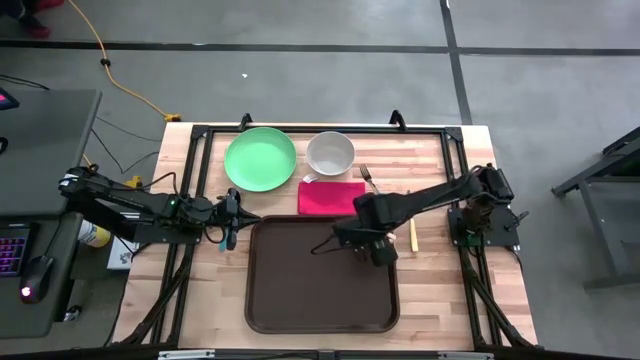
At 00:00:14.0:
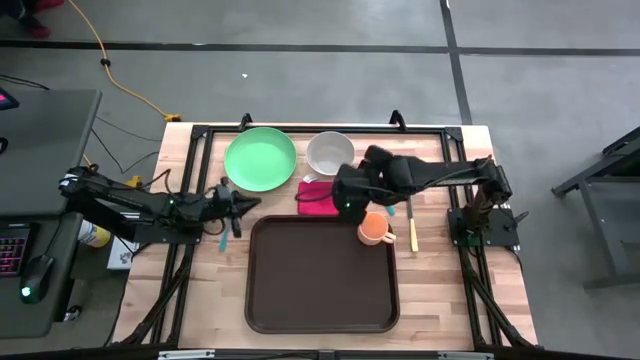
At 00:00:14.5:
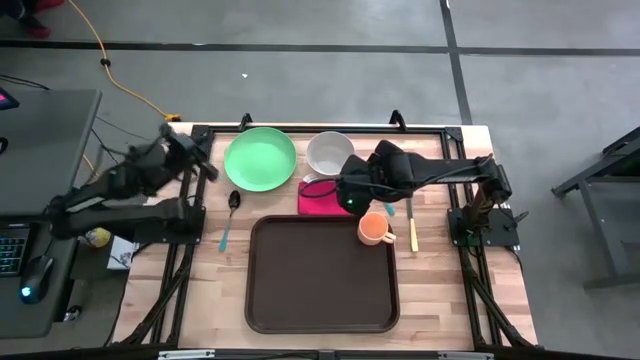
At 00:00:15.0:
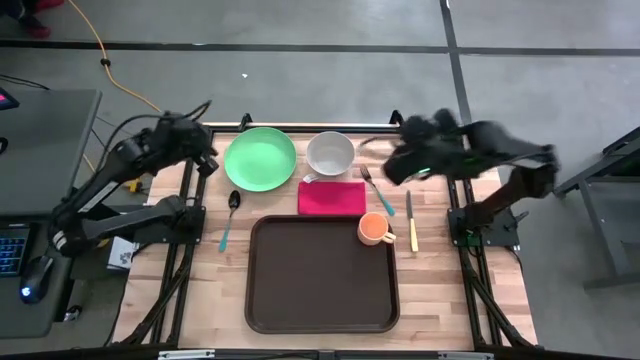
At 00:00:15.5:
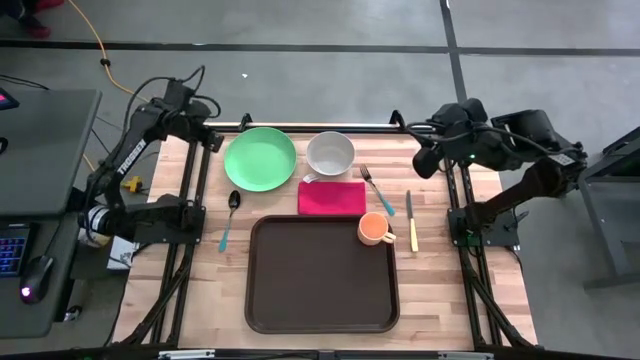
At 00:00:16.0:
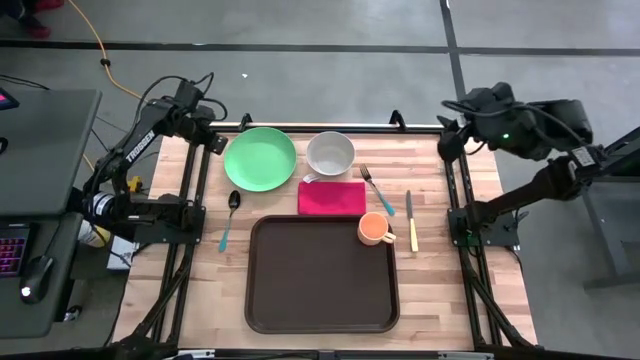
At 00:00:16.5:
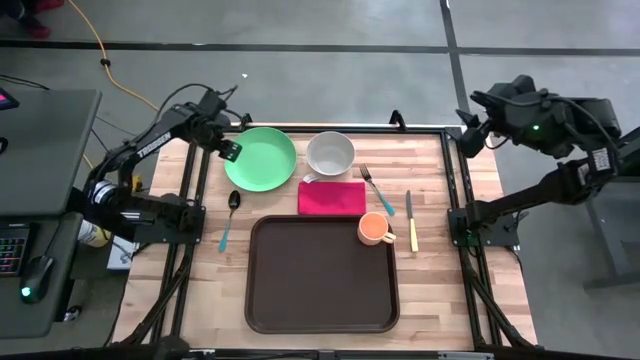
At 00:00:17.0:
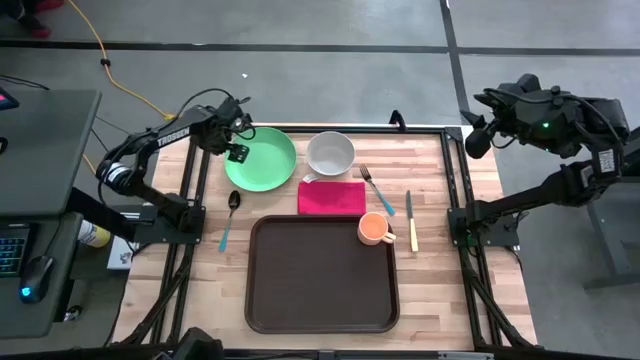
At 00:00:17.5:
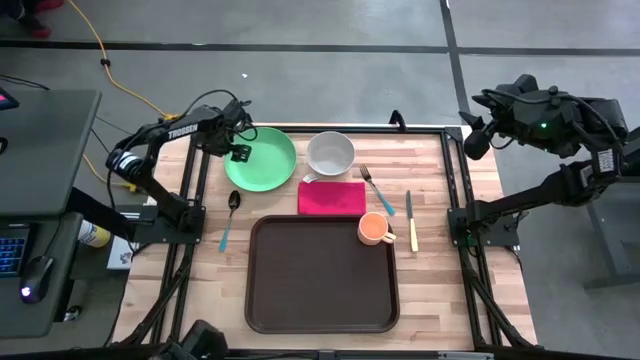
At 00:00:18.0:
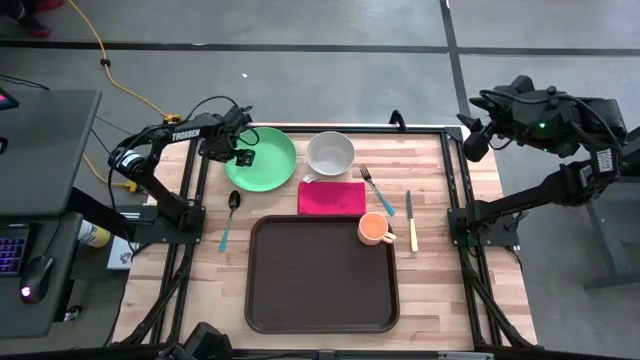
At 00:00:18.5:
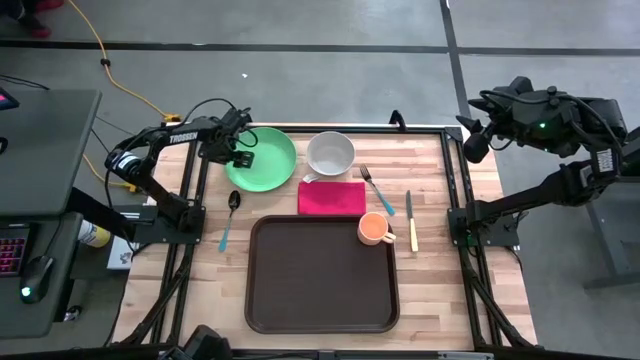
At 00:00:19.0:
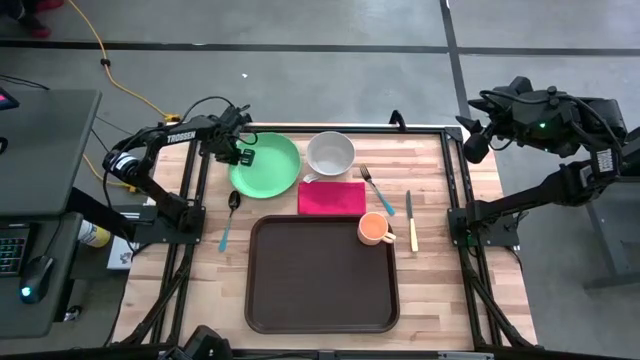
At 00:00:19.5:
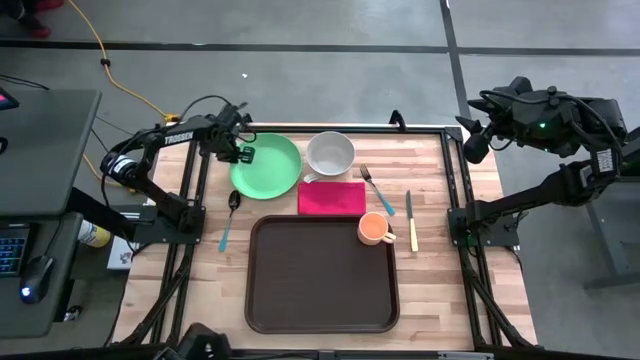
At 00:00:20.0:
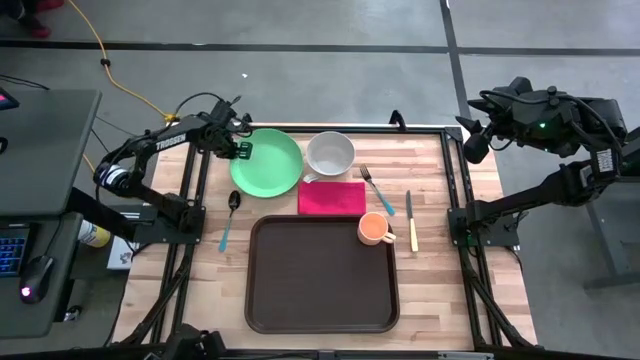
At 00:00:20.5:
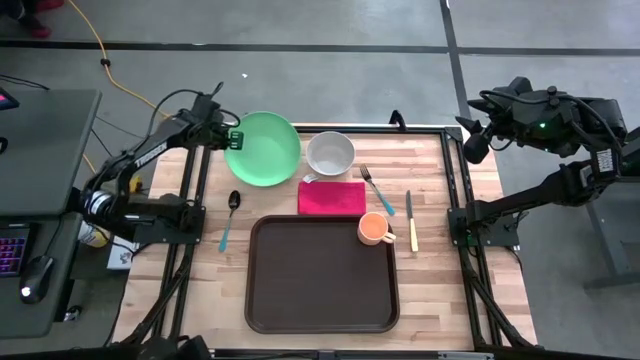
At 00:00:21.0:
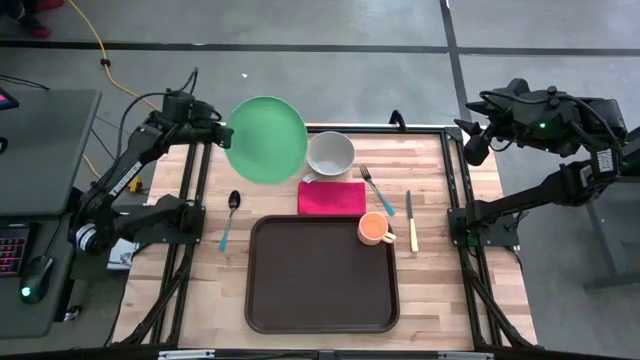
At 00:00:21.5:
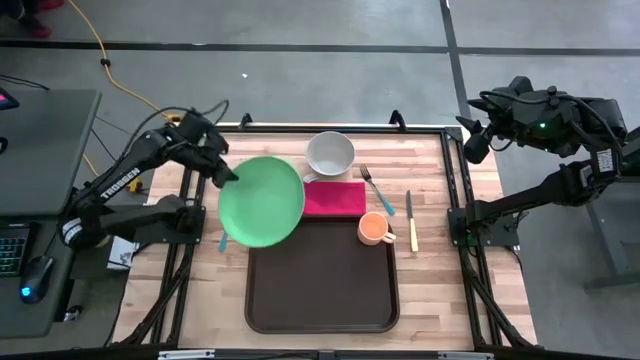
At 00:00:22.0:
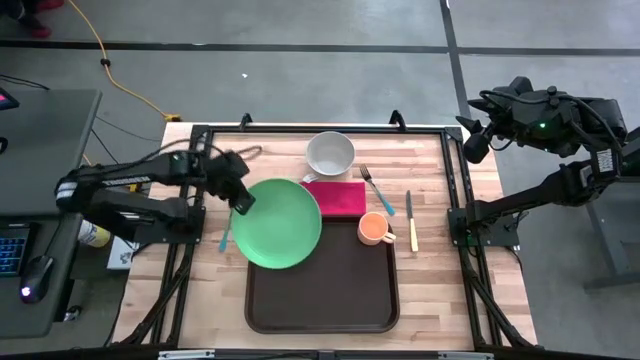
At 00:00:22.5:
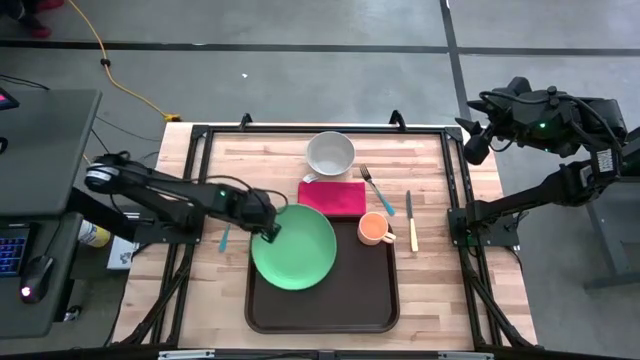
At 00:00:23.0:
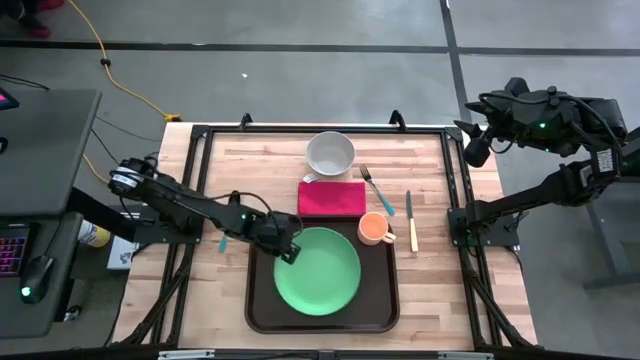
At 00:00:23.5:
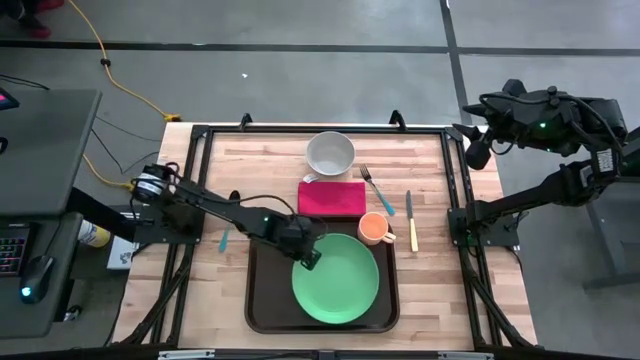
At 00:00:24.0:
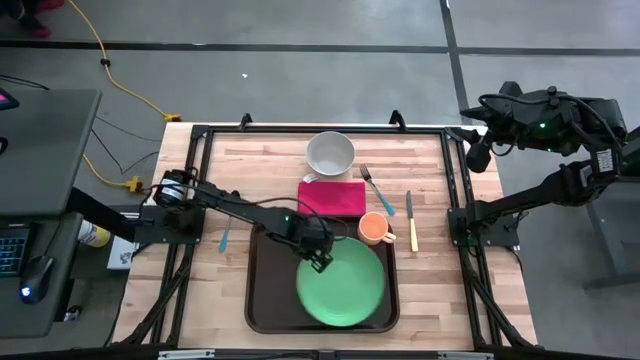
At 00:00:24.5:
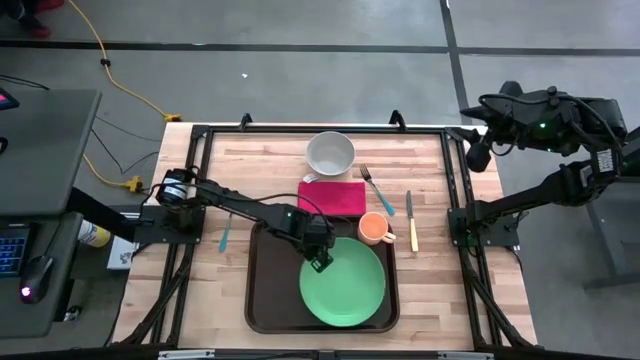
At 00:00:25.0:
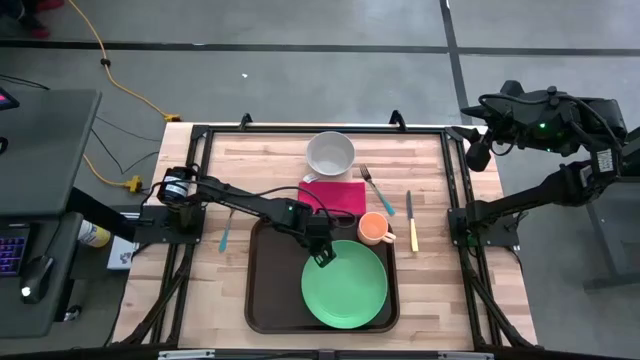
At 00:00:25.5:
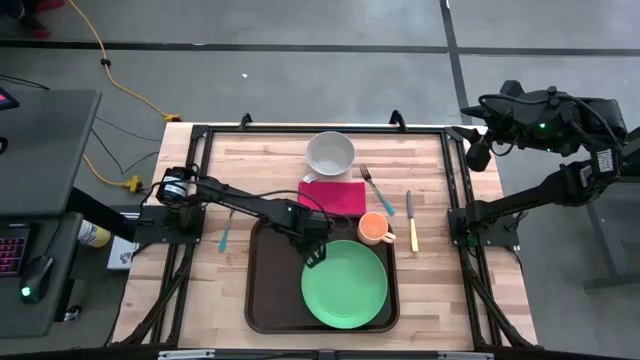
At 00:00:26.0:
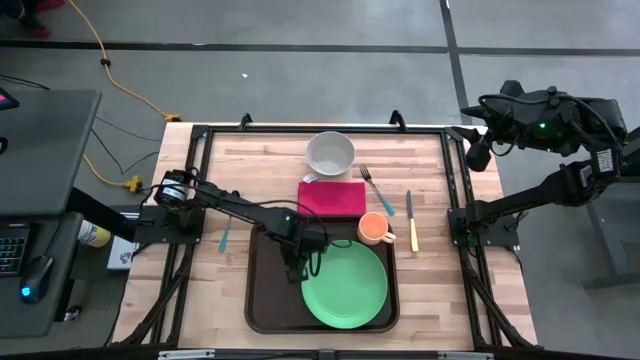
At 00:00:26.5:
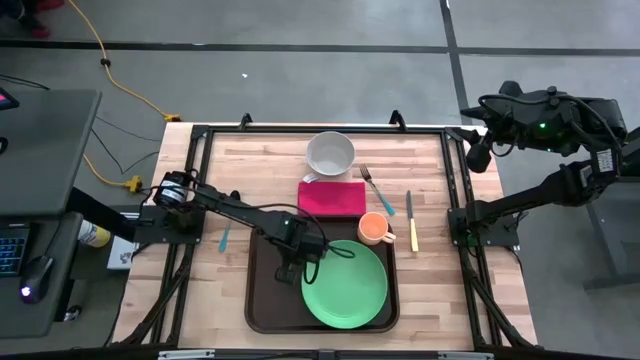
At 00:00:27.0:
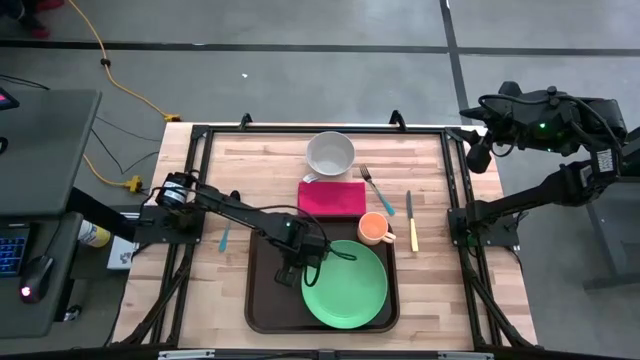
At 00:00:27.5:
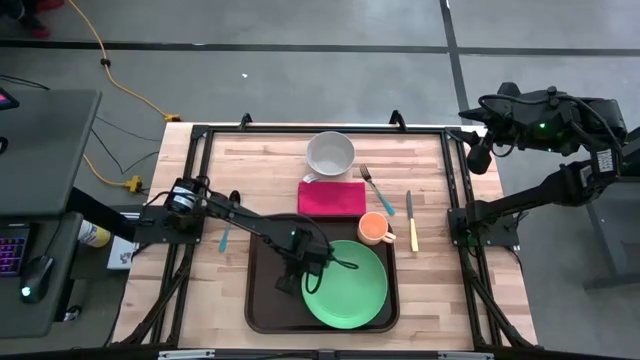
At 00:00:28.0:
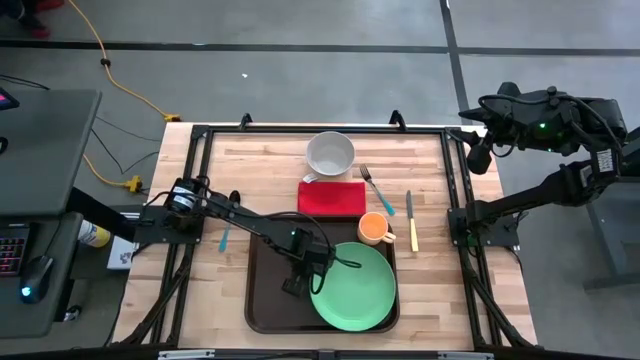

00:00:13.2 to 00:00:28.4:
Task: Set up tray
Put the green plate on the brown serving tray to the bottom of the orange mug

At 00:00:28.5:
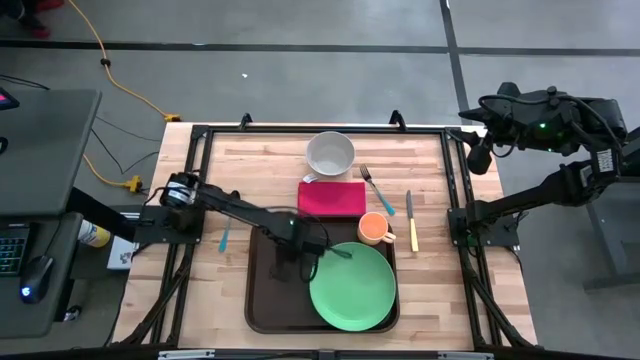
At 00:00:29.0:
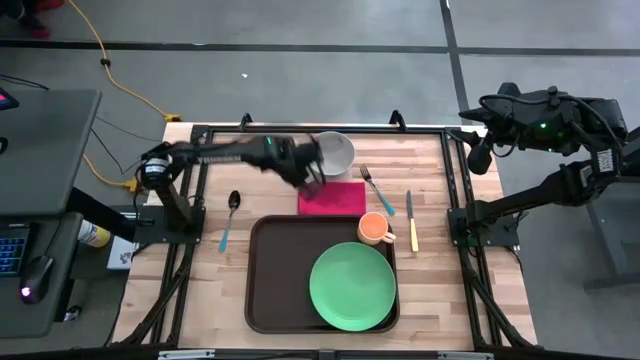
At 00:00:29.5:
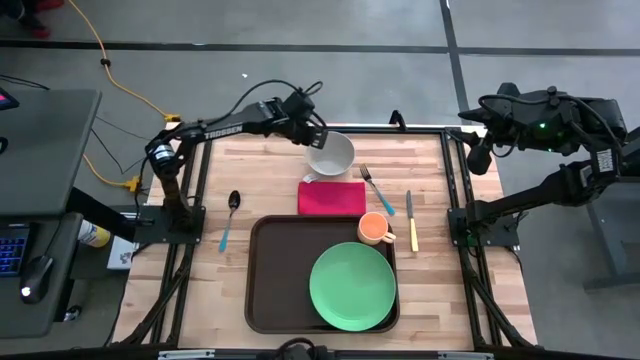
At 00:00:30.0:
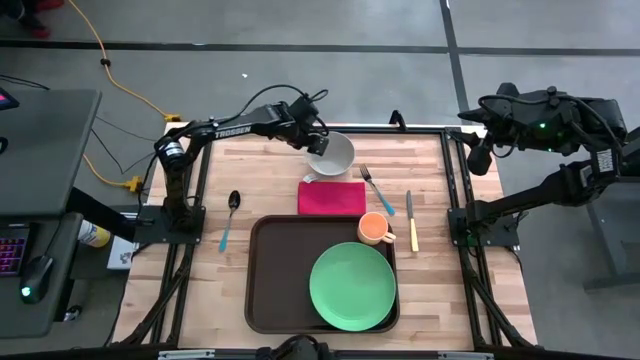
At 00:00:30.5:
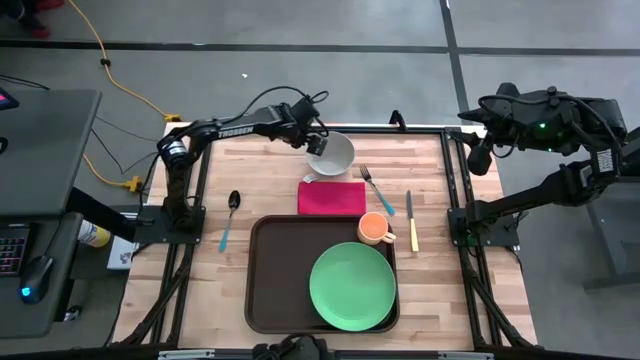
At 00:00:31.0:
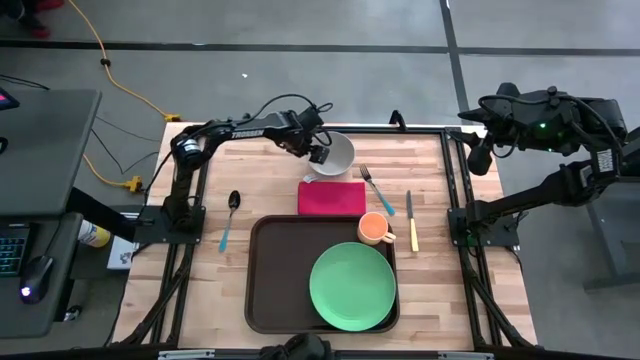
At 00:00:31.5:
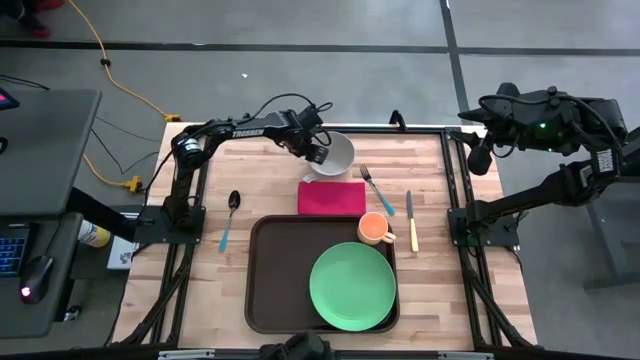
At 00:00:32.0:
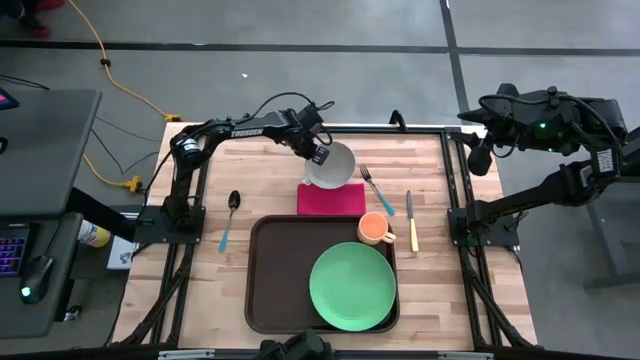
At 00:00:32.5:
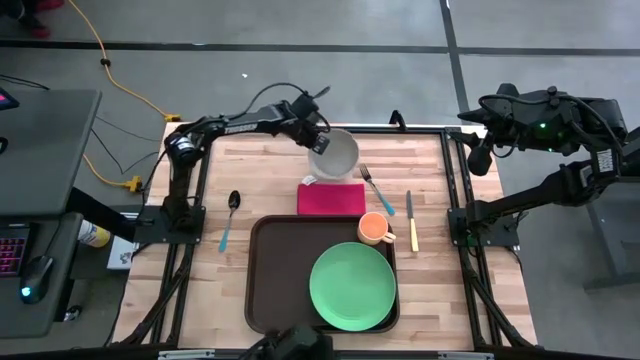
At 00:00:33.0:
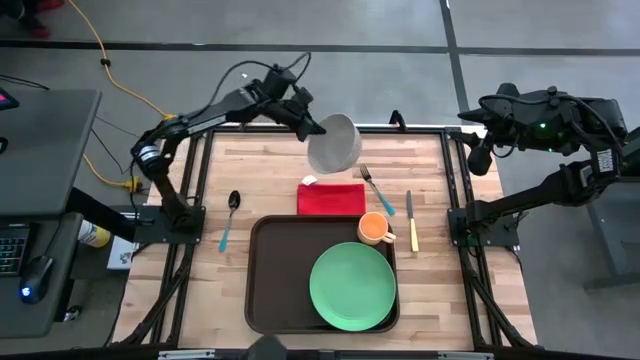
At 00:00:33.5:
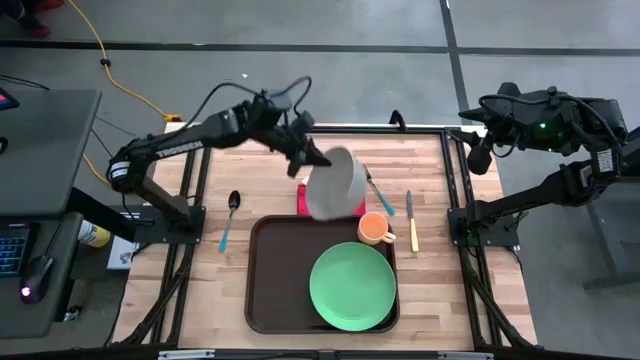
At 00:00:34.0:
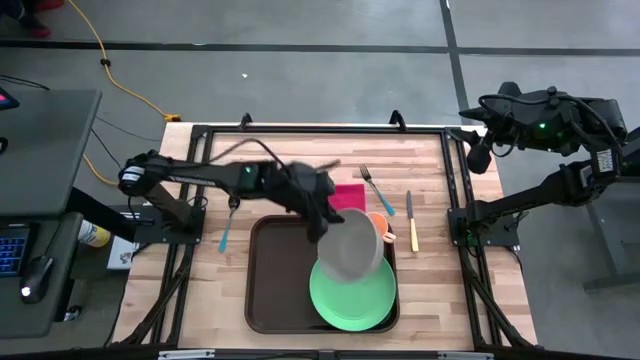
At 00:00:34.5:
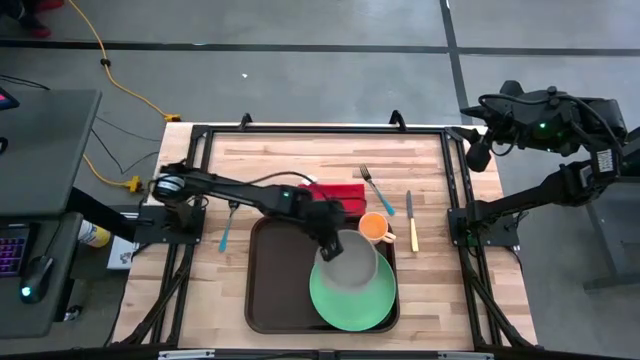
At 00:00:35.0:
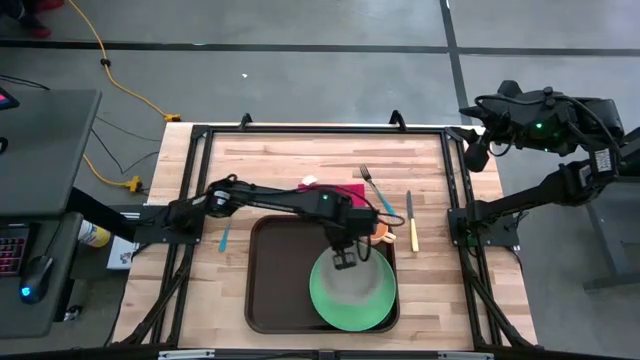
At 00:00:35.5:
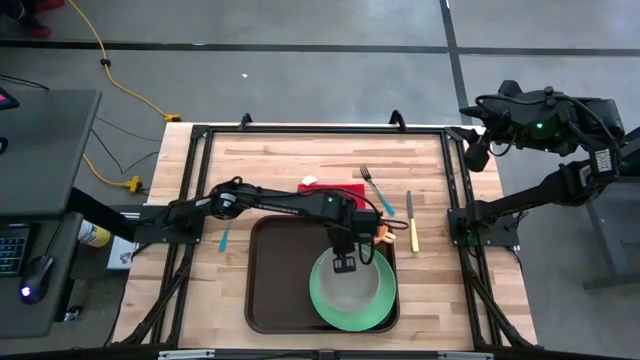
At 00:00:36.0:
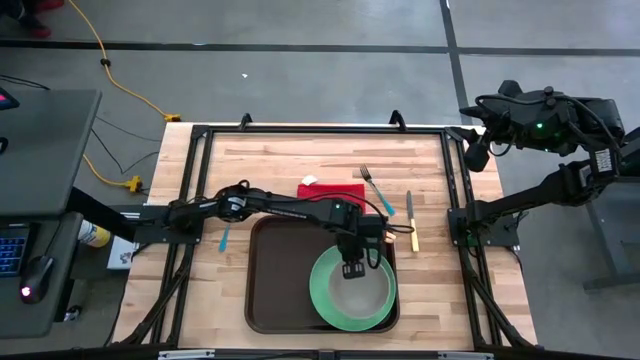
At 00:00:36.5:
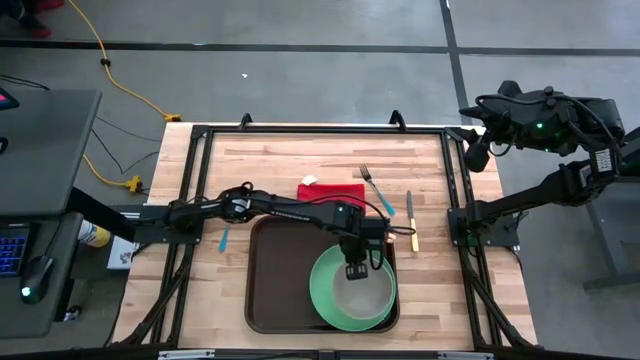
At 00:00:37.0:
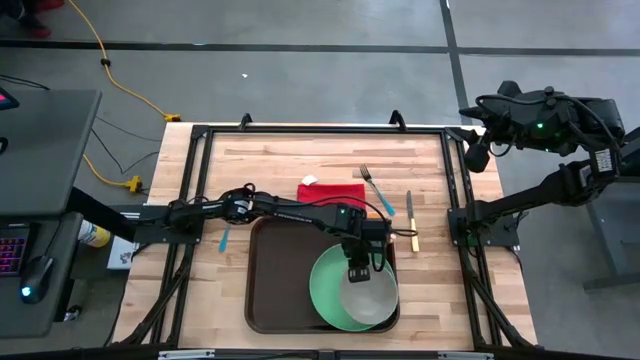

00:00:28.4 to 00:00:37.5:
Put the gray bowl on the green plate to the bottom of the orange mug
